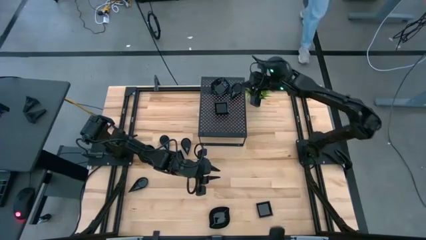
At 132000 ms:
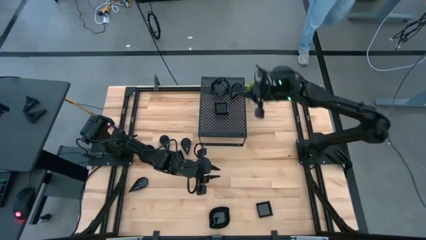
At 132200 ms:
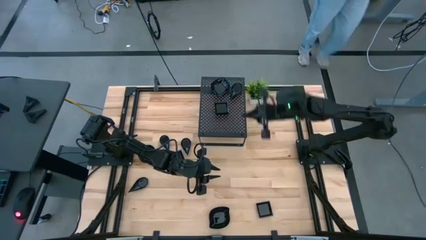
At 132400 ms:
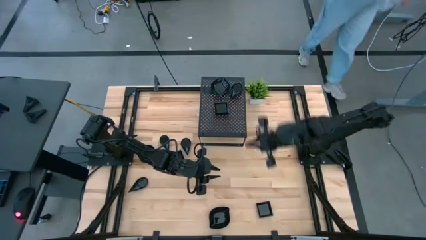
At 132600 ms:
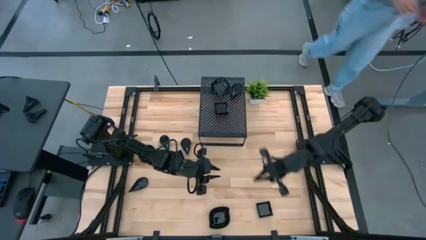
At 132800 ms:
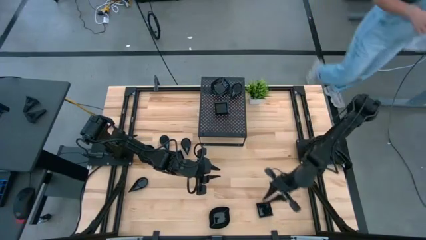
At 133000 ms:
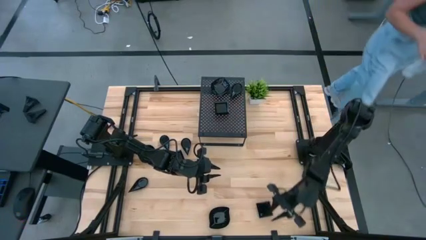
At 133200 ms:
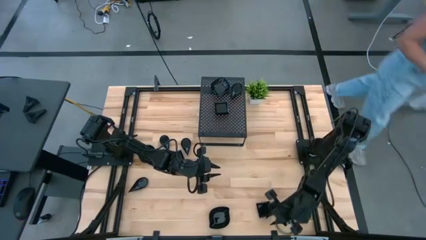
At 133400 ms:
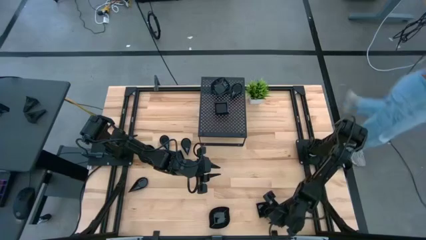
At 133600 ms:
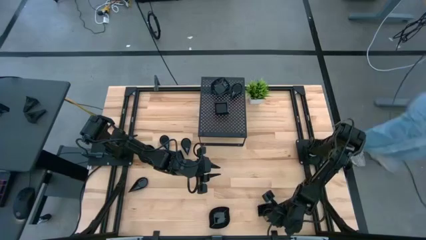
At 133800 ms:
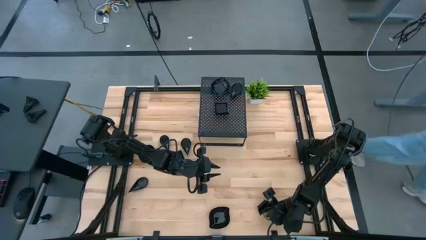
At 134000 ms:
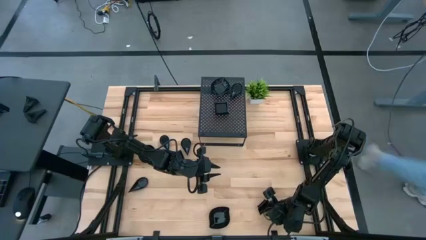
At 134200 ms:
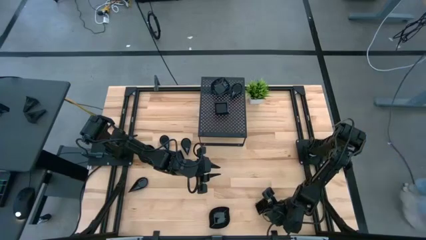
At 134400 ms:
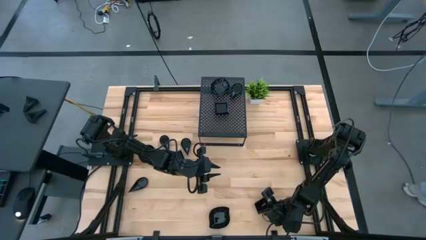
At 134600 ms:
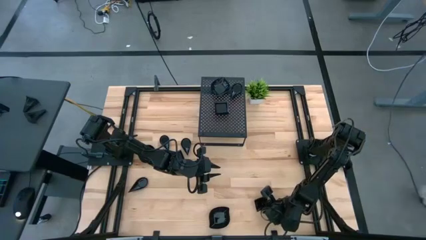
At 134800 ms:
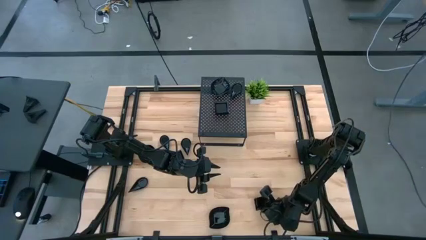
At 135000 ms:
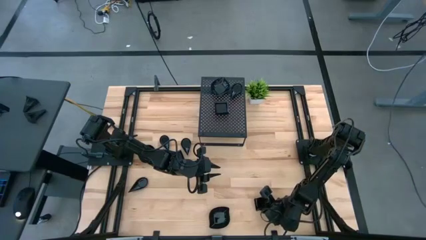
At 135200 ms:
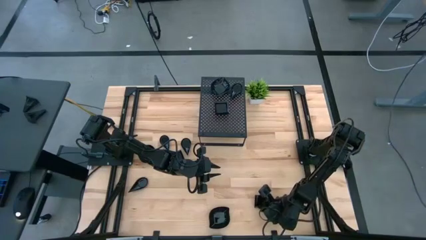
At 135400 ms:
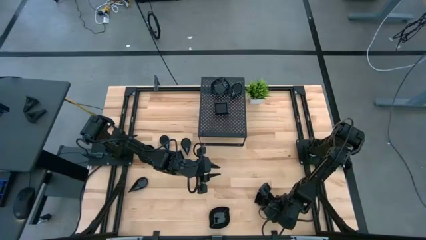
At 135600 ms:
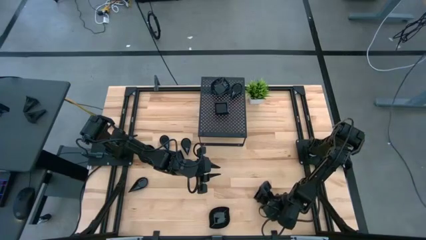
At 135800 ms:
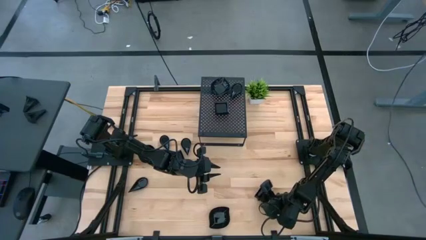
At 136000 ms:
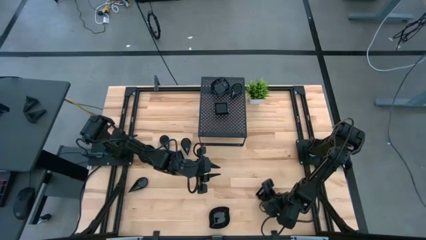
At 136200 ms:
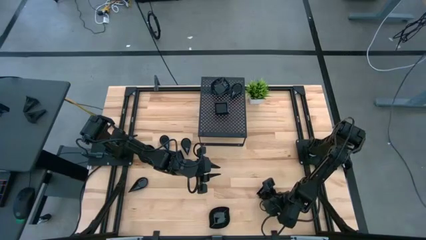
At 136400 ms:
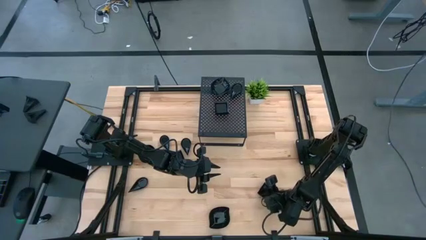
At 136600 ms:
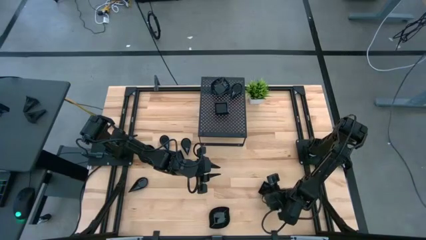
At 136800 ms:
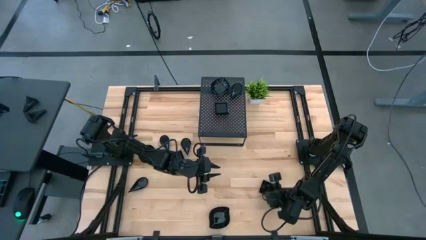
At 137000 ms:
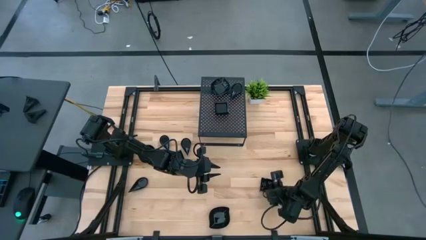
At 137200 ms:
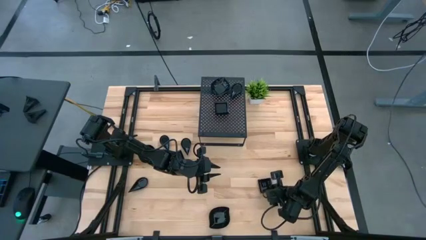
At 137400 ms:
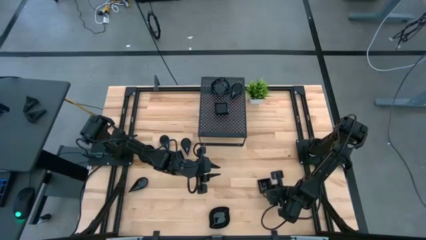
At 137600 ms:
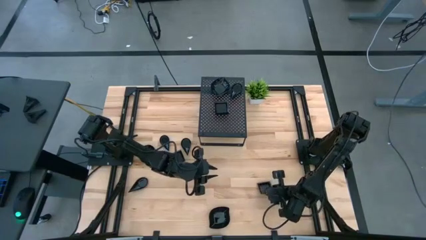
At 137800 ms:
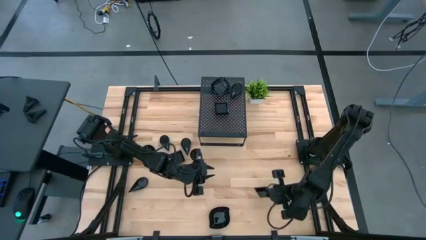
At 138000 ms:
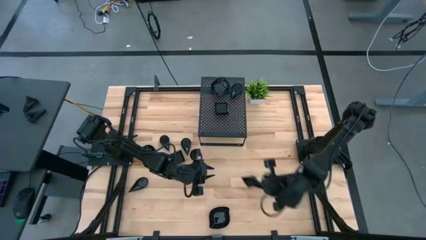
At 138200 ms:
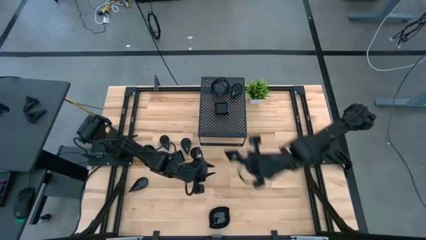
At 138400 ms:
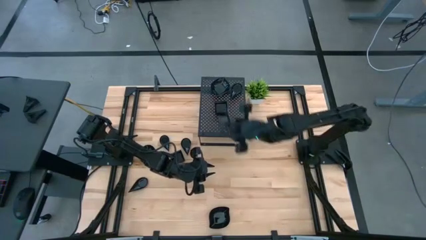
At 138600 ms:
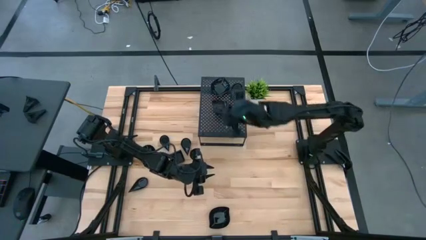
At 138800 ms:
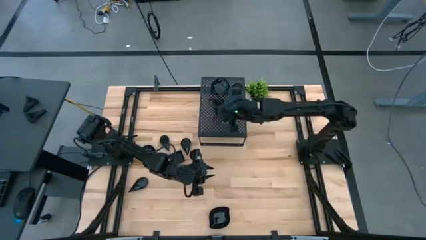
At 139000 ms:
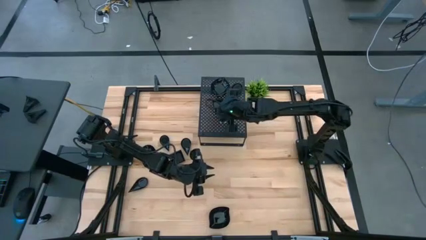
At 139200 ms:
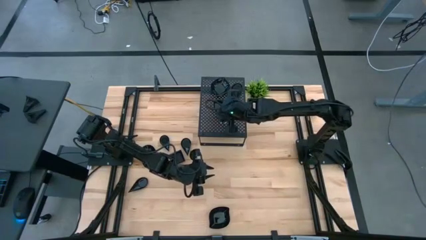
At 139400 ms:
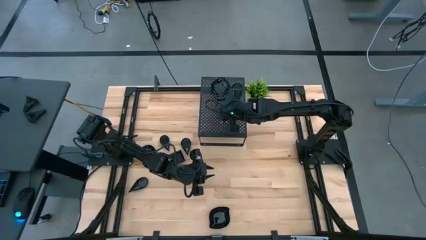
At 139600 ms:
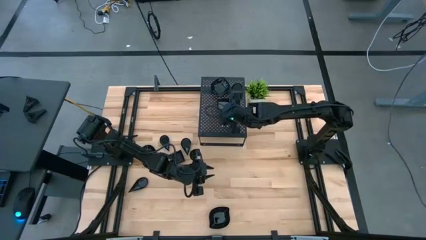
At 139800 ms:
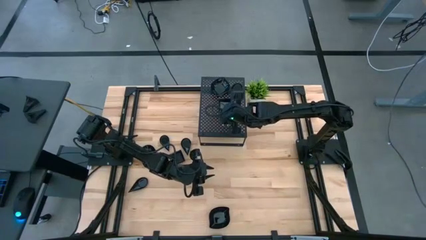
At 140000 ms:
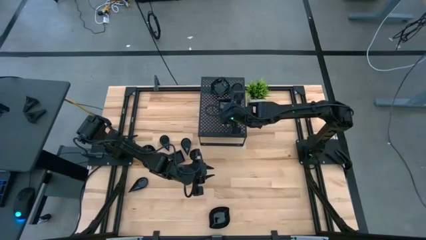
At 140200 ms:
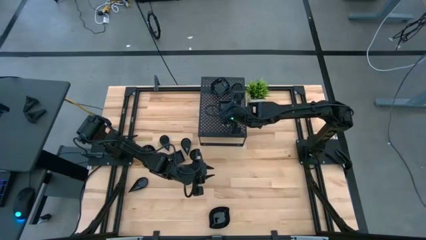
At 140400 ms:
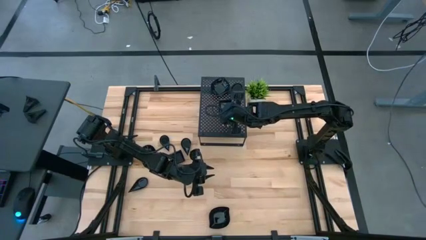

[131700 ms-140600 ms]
Task: Pick & Place Mini shaped plates
Stack the black square plate on top of the black square plate on the shelf

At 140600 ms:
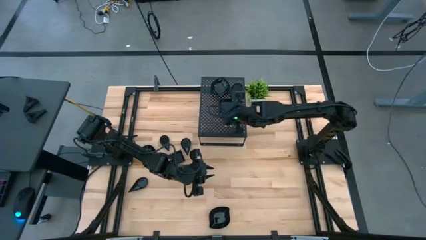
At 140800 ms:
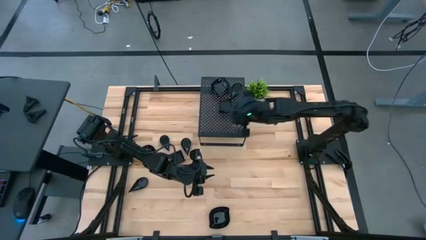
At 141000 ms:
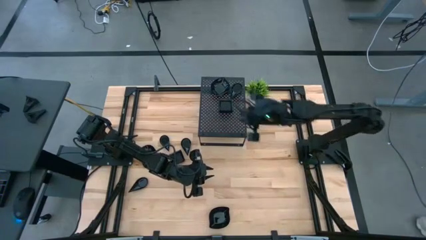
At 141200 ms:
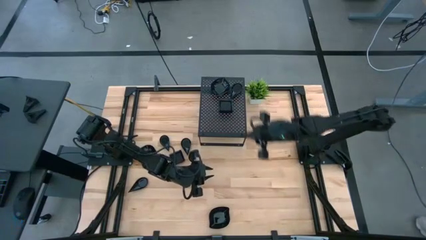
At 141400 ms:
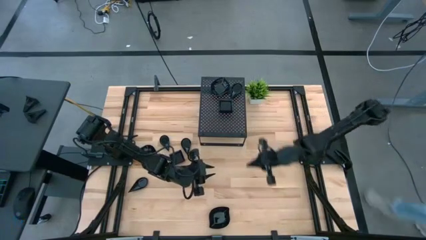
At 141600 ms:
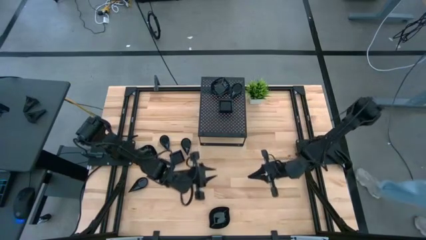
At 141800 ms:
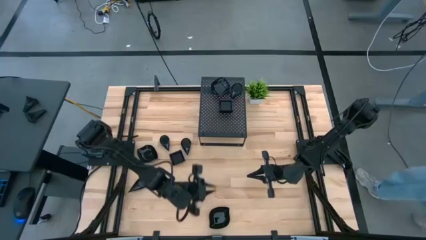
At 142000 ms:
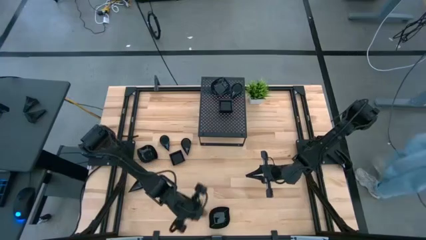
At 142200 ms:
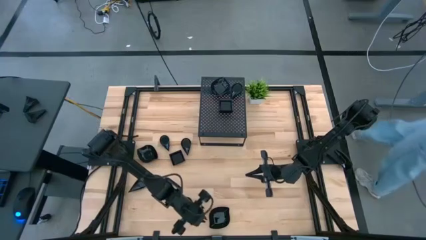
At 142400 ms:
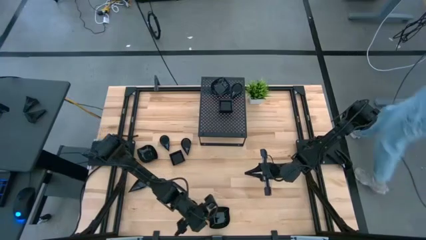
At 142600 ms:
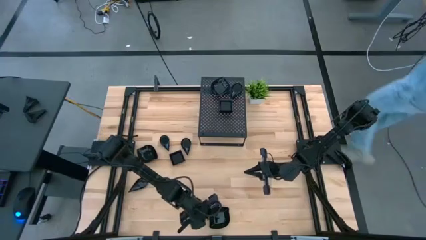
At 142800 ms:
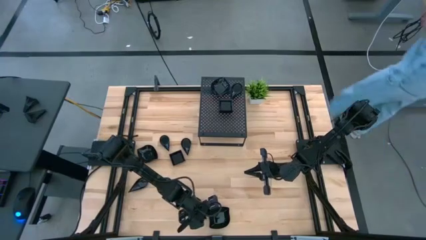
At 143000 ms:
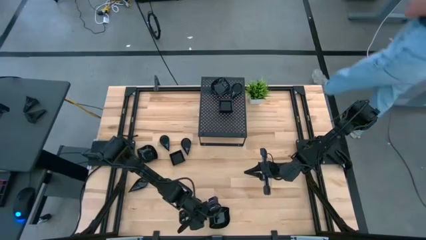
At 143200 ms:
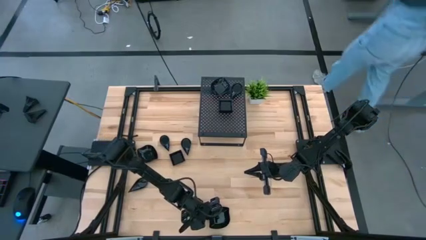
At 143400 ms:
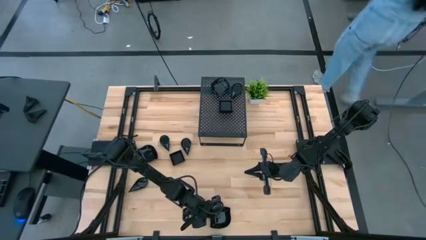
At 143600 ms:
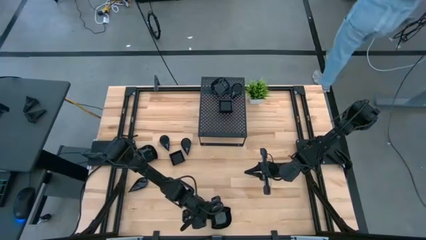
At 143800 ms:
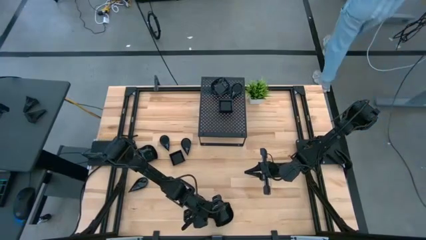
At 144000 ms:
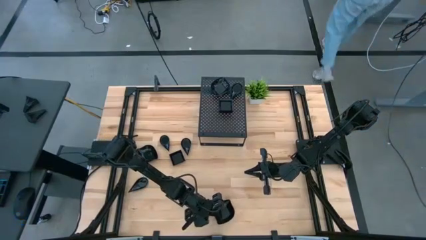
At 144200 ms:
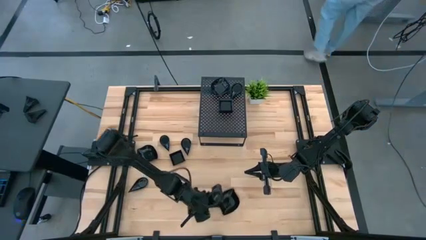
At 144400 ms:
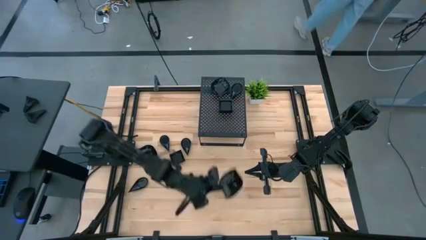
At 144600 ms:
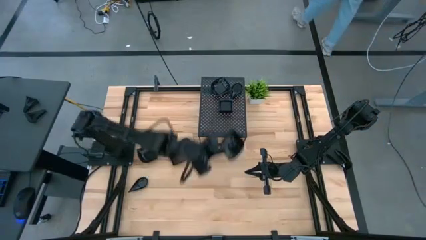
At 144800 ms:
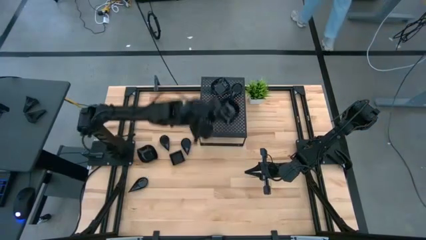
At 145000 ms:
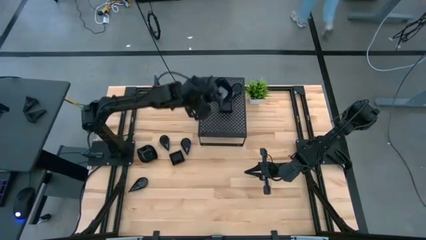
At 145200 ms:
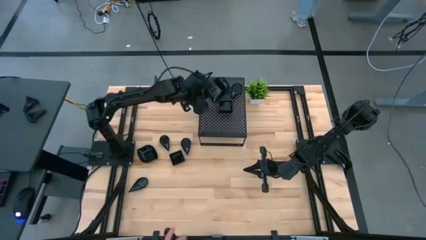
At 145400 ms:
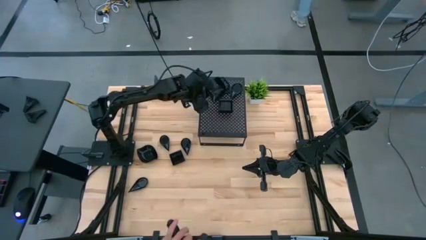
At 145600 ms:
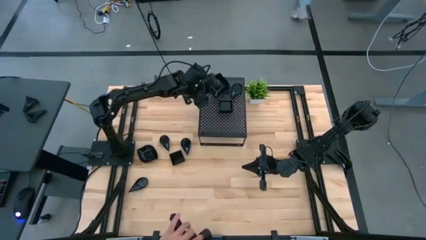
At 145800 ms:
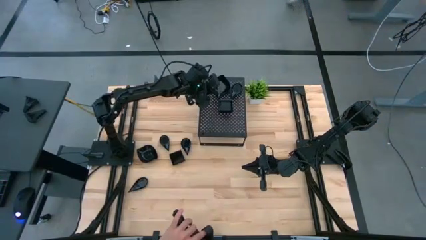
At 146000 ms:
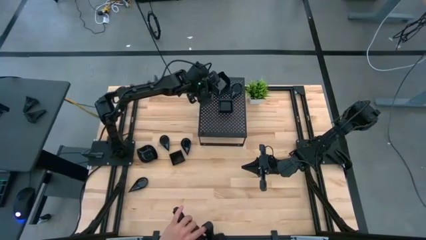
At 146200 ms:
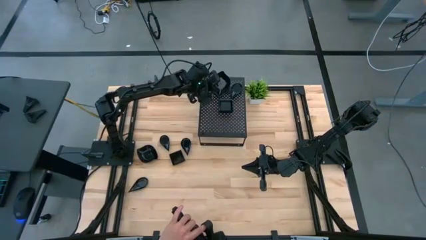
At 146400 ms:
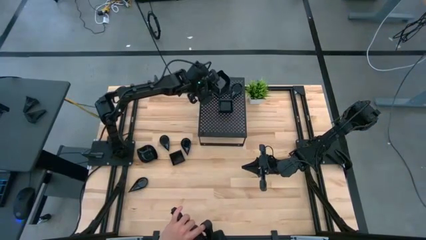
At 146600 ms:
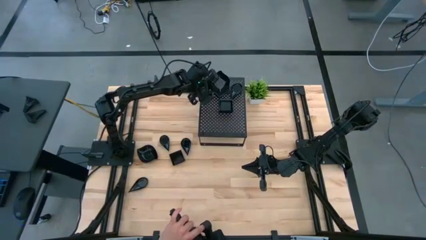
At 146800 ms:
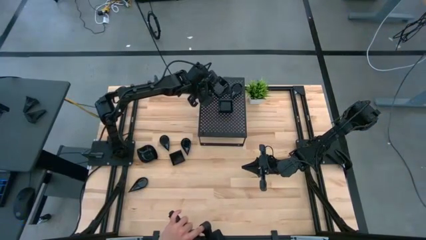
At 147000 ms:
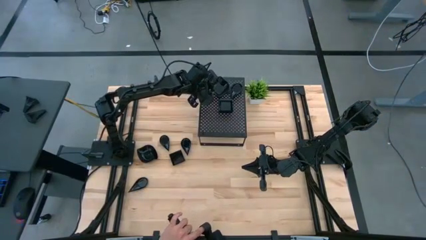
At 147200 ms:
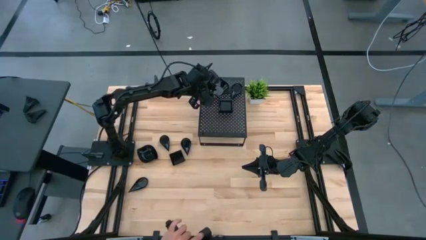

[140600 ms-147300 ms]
Stack the black leaf-shaped plate on top of the black leaf-shaped plate on the shelf
